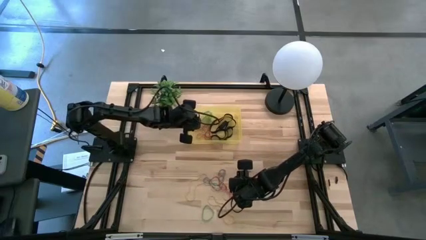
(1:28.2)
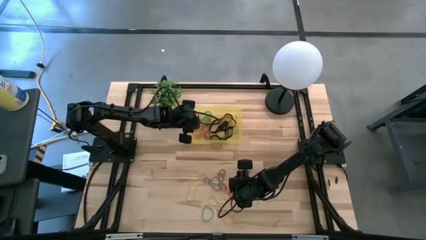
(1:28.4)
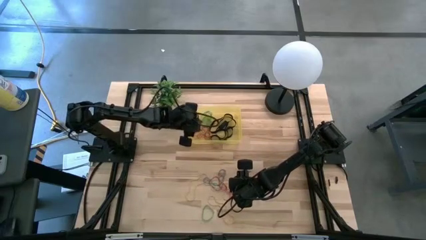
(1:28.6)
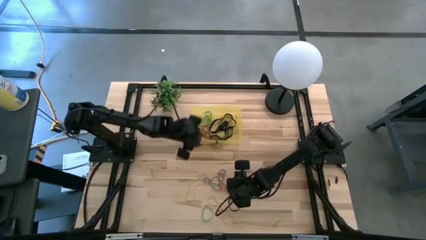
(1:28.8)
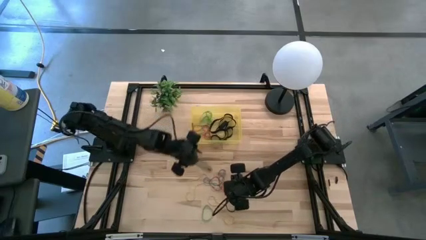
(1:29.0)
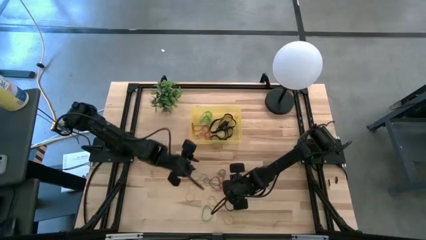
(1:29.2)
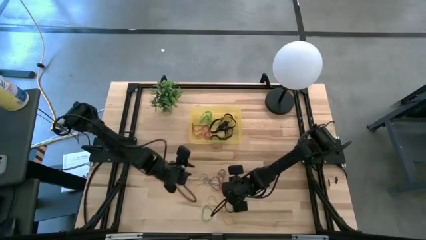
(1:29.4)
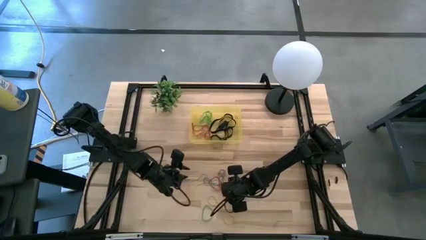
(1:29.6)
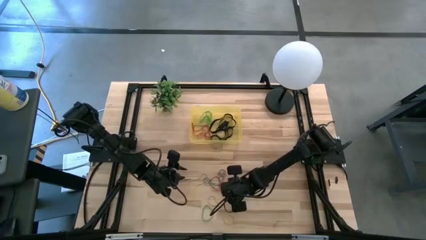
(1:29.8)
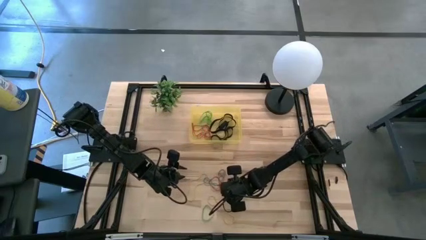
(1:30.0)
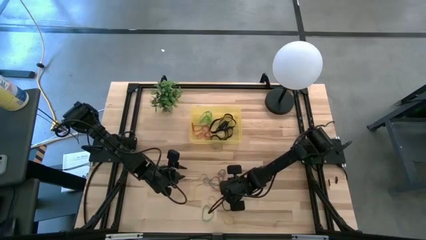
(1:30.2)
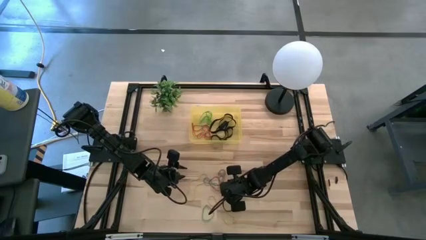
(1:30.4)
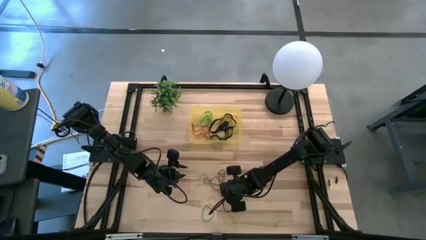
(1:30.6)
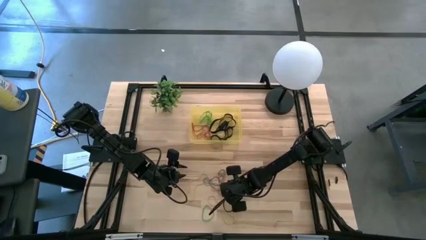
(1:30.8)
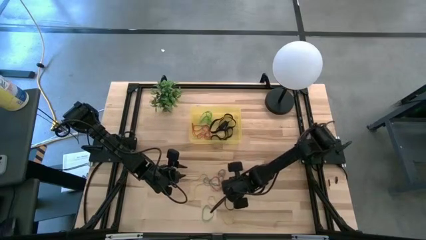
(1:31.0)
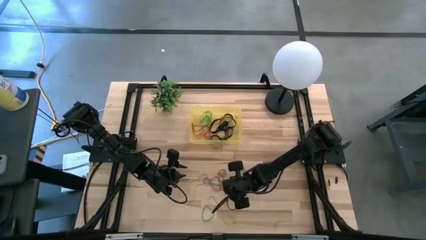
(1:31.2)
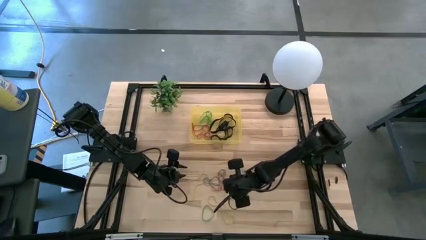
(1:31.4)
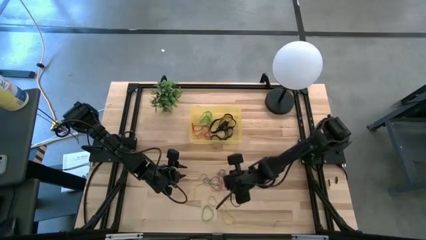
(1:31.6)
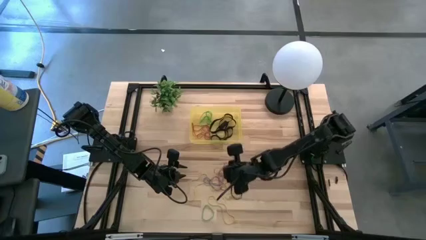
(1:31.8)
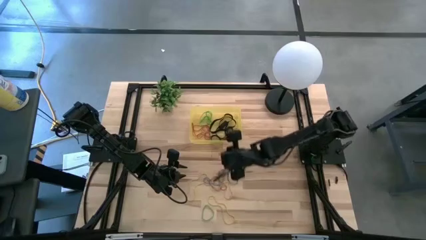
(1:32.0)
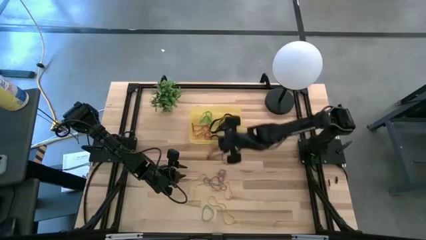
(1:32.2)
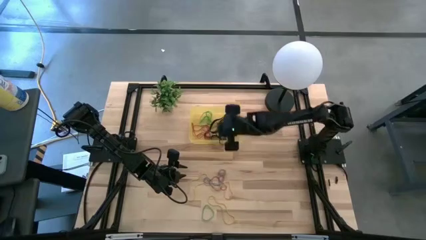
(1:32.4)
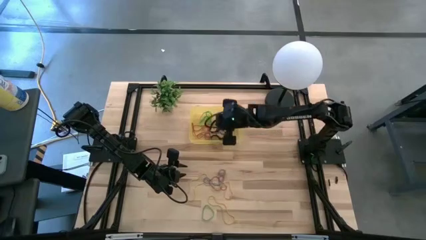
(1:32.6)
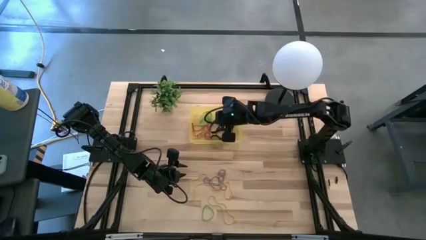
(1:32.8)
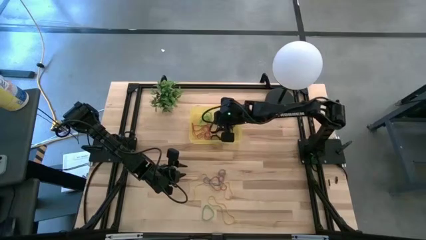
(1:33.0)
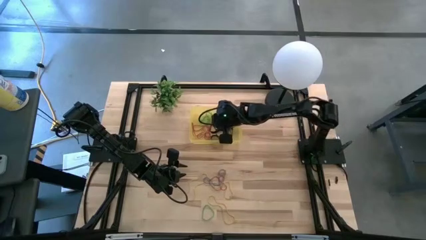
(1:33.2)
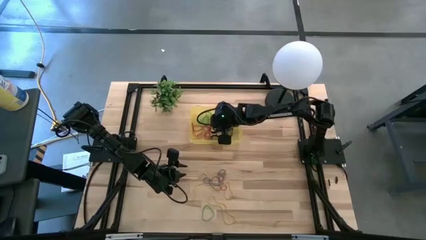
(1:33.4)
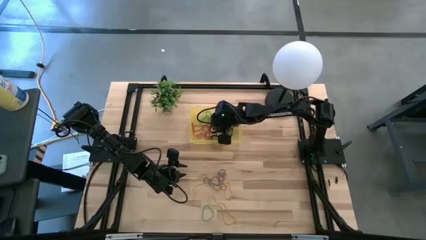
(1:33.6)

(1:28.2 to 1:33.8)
Task: Pick and place rubber bands into bin
Put the red rubber band into the yellow bin

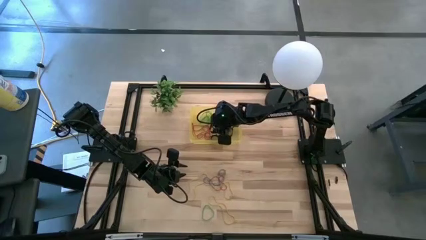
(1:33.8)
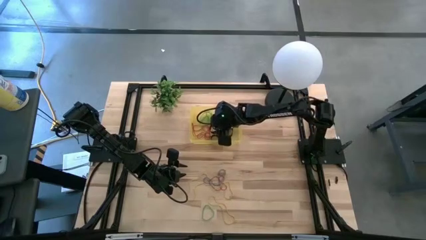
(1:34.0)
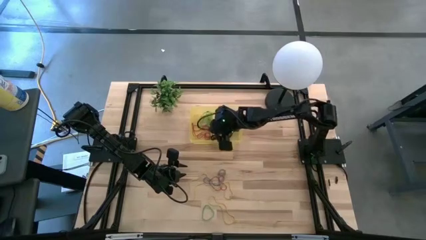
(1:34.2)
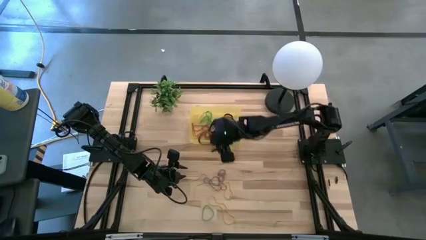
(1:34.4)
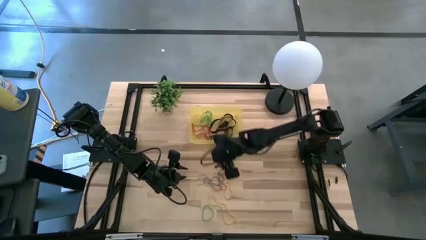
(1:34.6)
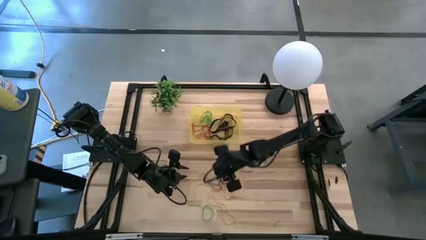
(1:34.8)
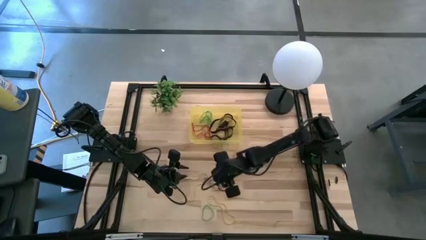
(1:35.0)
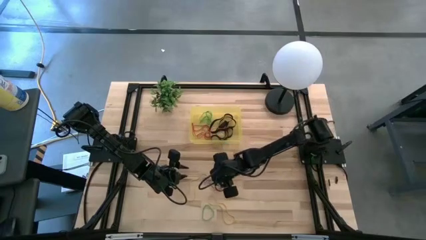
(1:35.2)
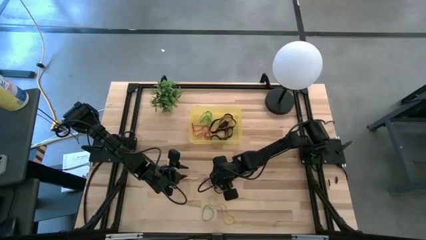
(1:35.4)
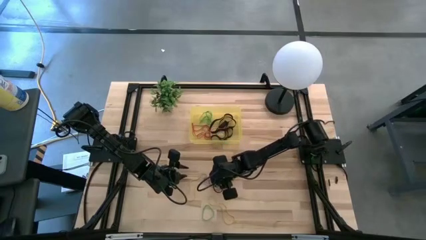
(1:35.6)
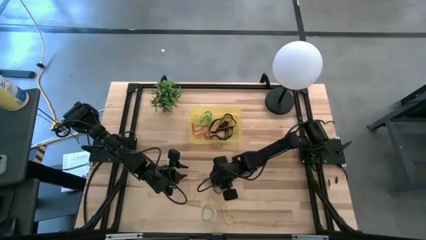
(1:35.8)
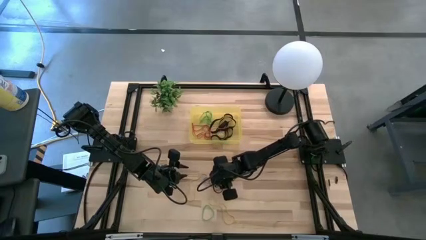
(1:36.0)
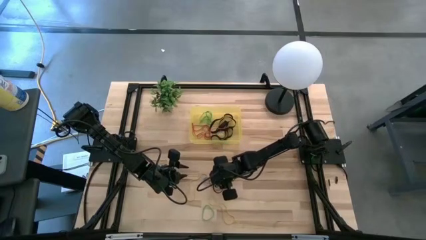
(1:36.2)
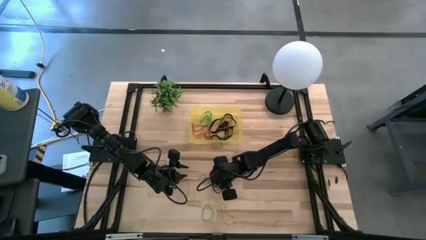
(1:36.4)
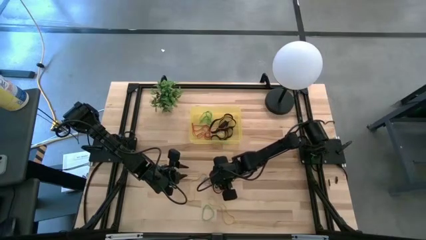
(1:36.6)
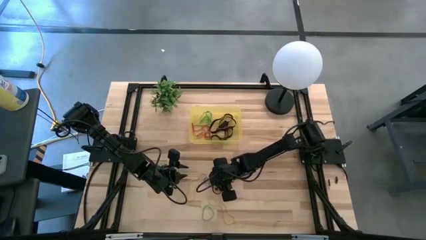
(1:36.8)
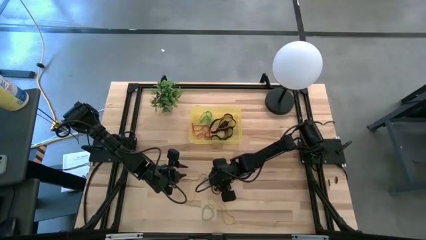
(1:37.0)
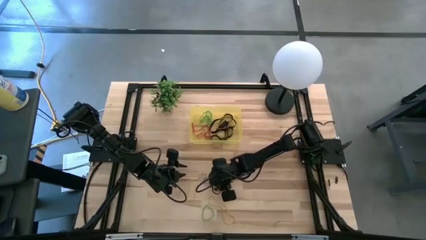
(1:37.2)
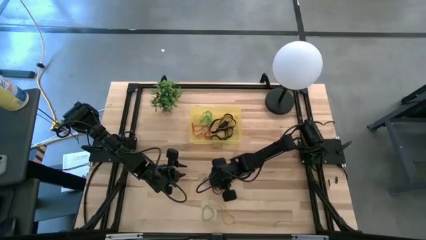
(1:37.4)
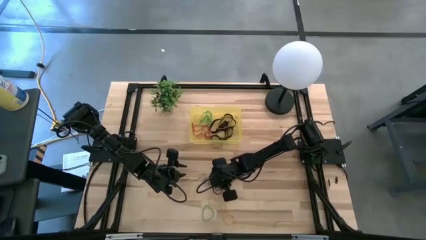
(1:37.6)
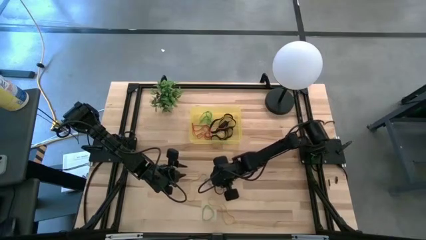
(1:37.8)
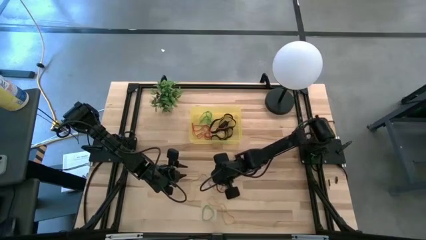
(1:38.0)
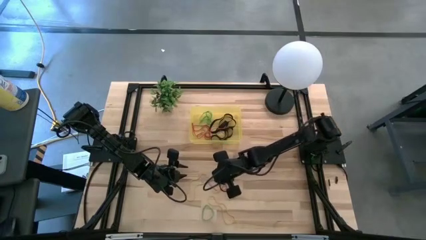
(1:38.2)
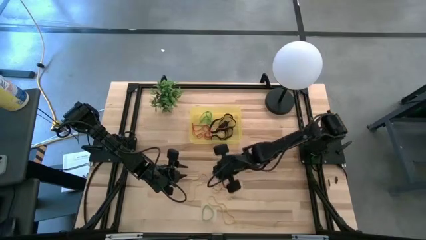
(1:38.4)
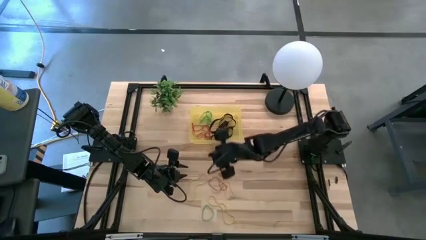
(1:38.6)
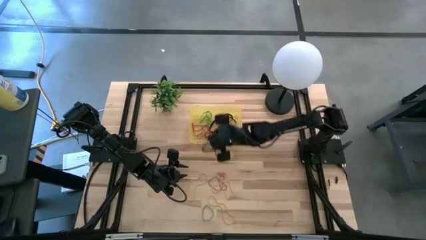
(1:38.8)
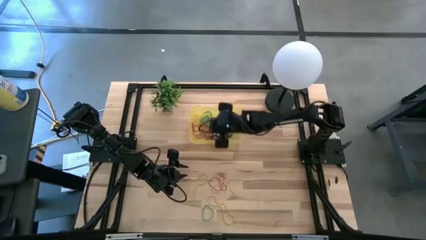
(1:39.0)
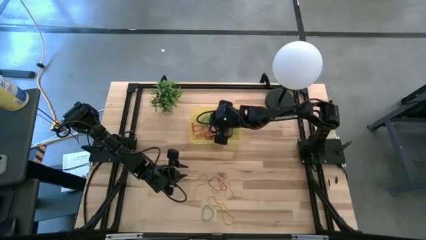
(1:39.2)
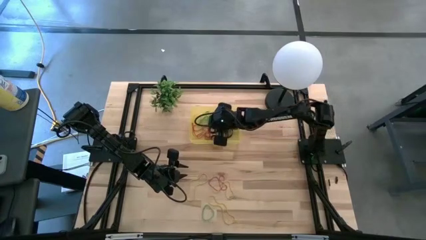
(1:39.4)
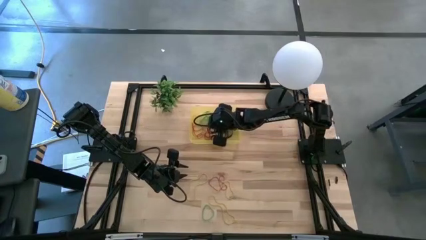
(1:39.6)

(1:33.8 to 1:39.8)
Put the blue rubber band into the yellow bin

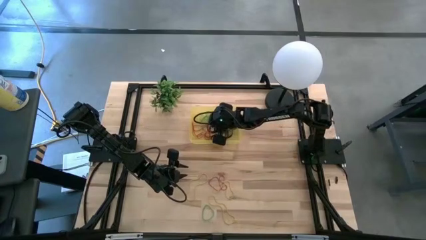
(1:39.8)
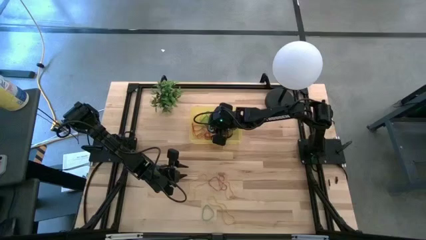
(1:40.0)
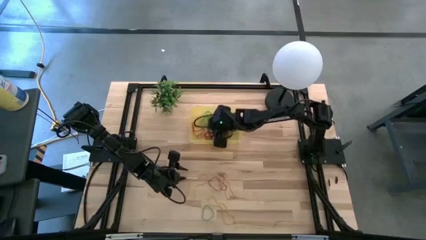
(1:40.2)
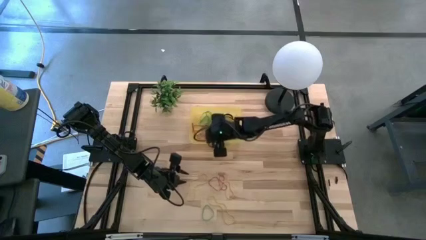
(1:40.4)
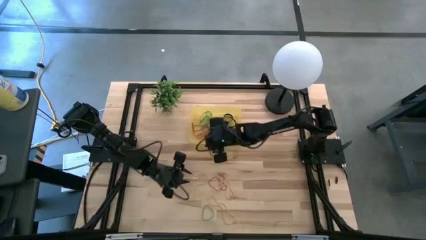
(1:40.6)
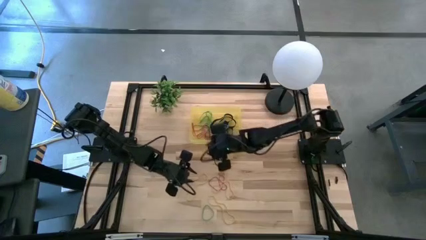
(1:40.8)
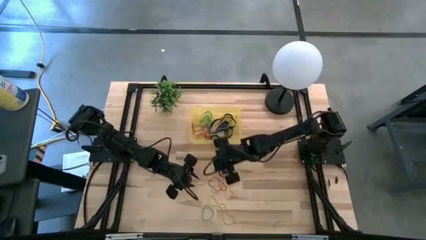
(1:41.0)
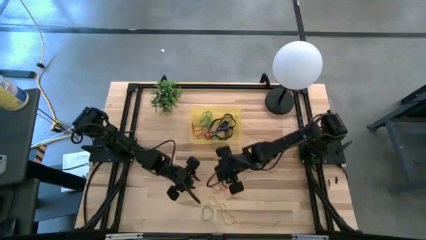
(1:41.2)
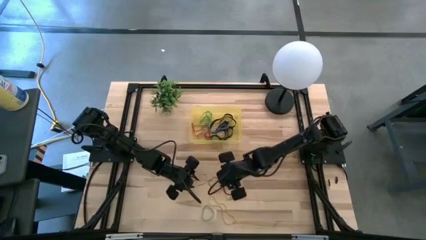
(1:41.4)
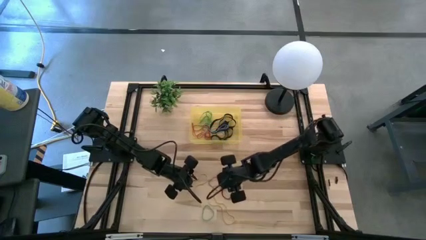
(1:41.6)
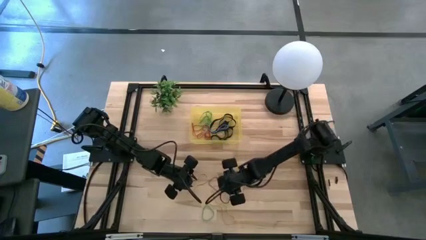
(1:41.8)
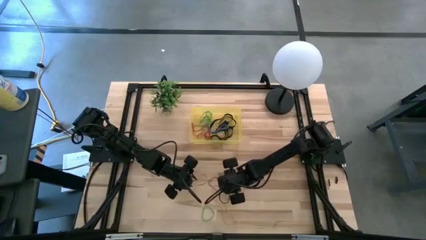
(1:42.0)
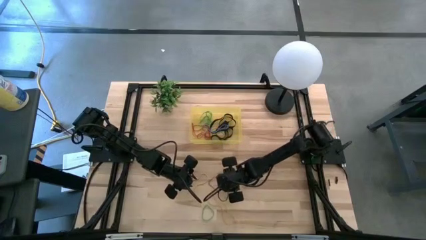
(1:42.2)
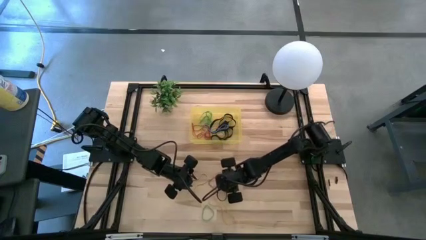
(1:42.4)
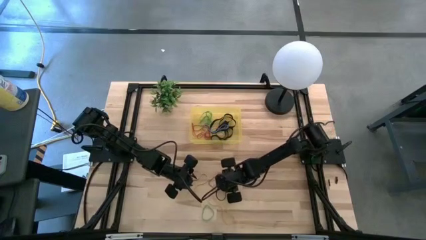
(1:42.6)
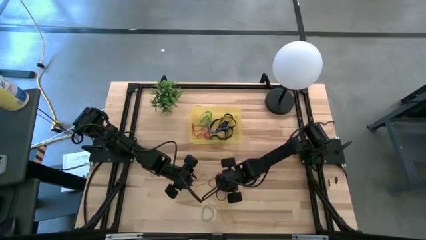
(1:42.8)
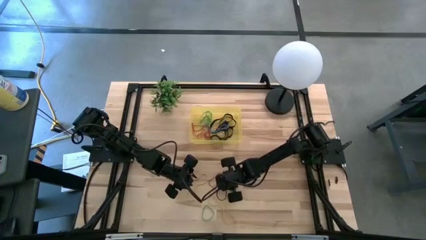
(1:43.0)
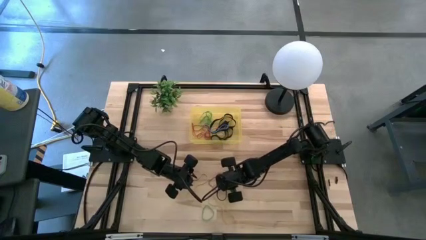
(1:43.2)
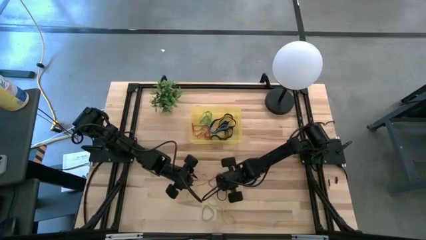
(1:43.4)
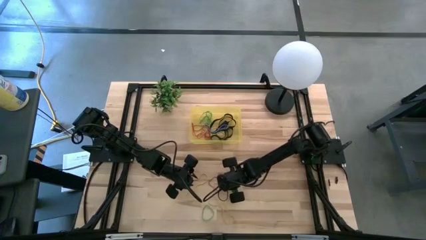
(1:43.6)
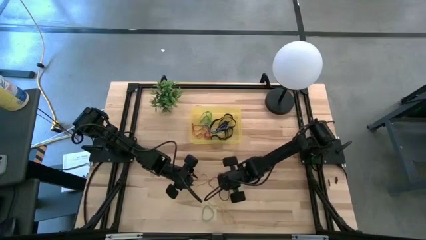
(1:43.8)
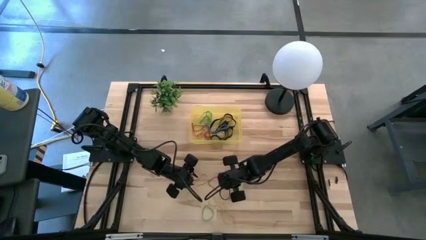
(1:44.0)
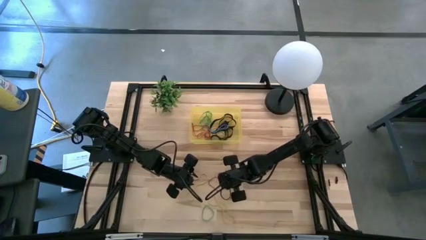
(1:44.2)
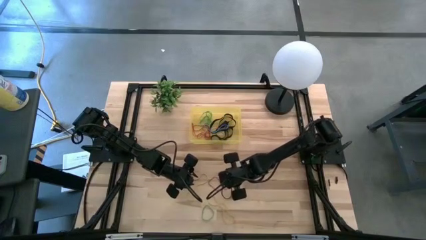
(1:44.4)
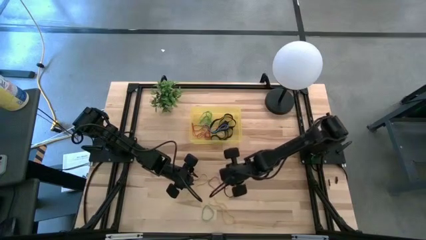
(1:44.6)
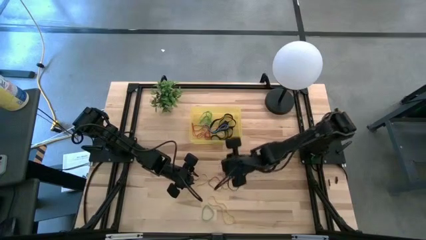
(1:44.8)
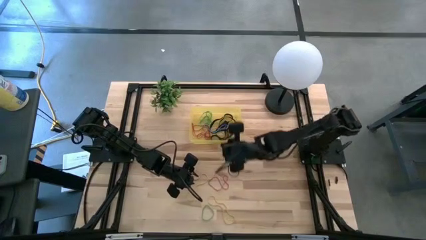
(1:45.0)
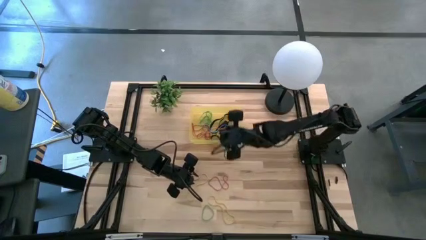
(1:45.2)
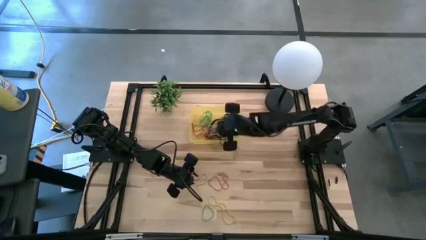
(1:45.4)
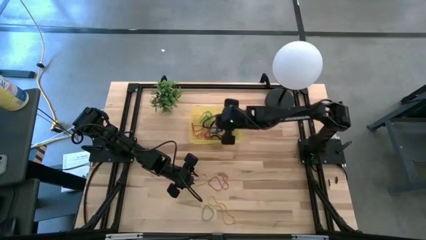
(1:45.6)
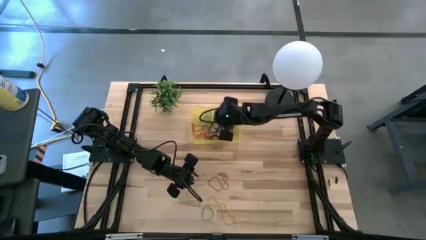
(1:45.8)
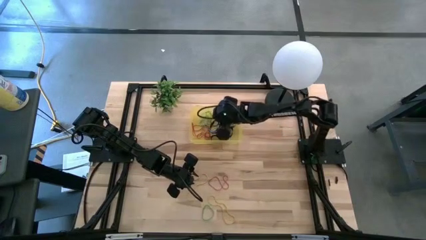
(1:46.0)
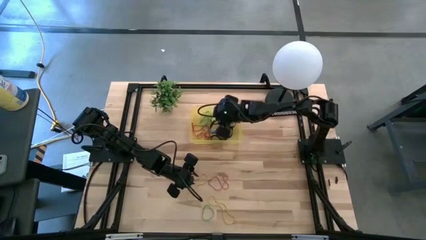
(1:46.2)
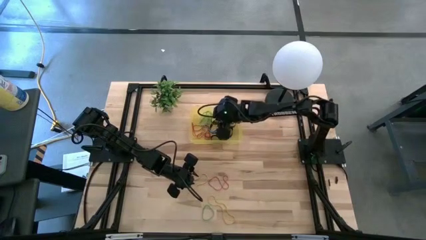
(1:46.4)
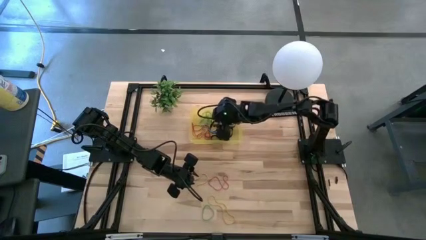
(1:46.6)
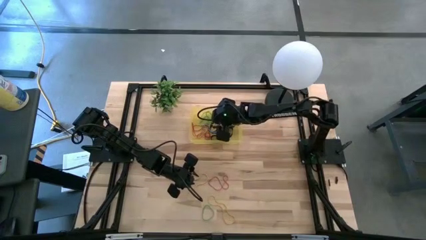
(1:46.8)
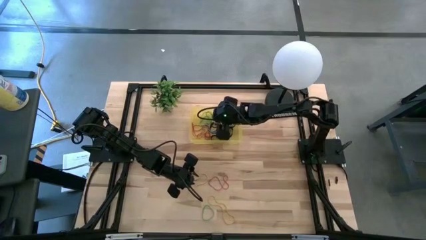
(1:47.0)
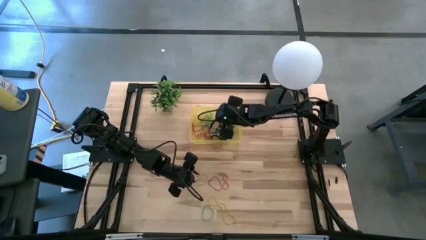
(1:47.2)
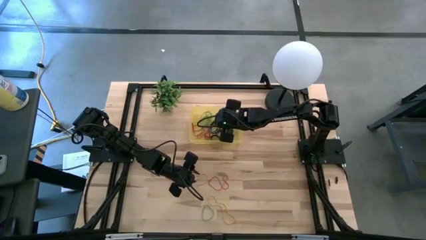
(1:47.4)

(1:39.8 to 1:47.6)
Put the yellow rubber band into the yellow bin
